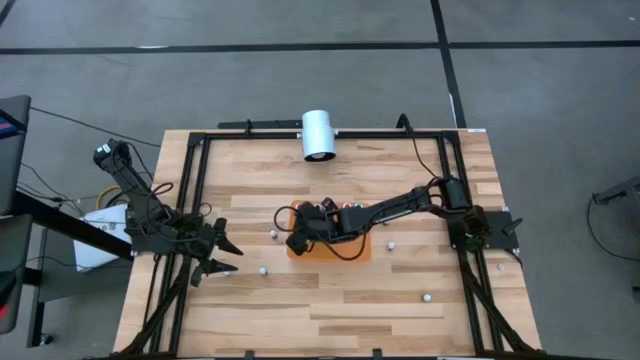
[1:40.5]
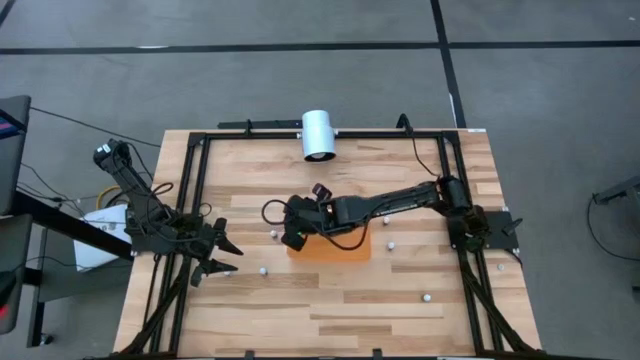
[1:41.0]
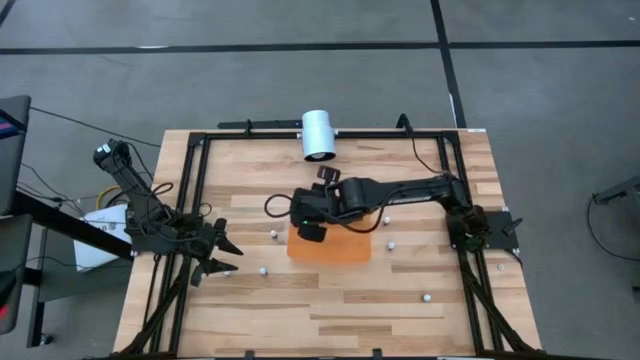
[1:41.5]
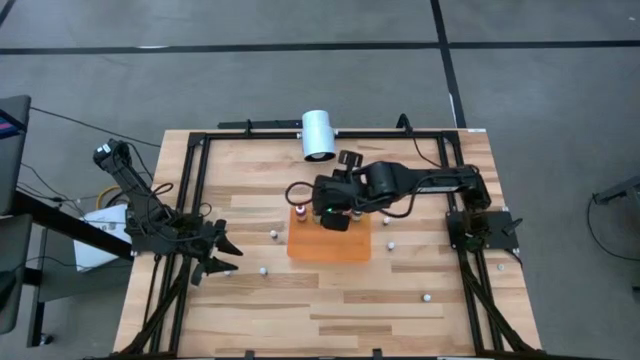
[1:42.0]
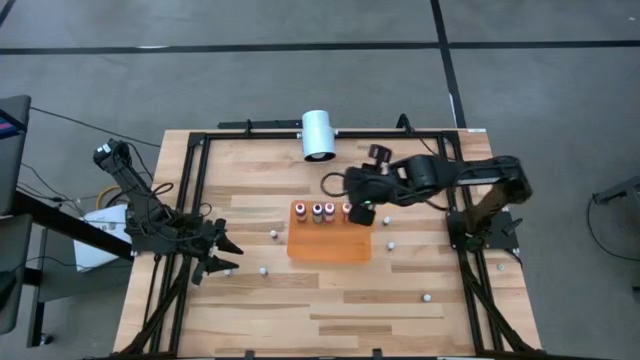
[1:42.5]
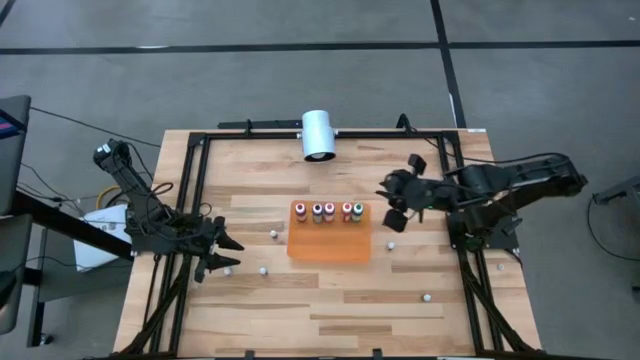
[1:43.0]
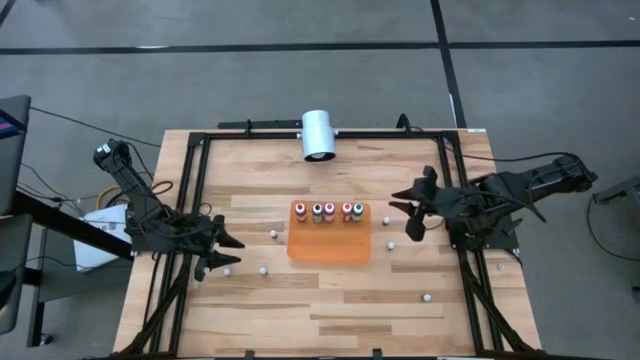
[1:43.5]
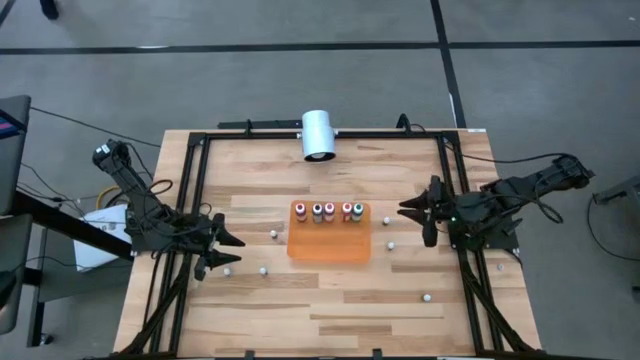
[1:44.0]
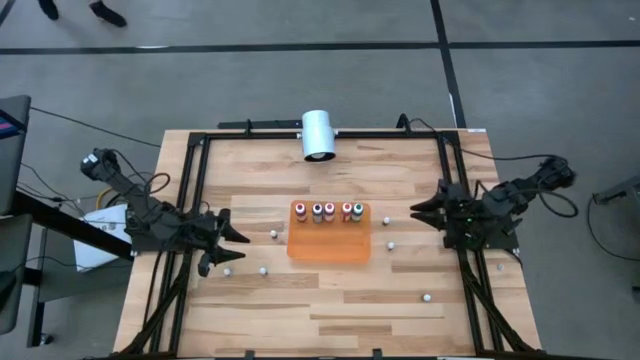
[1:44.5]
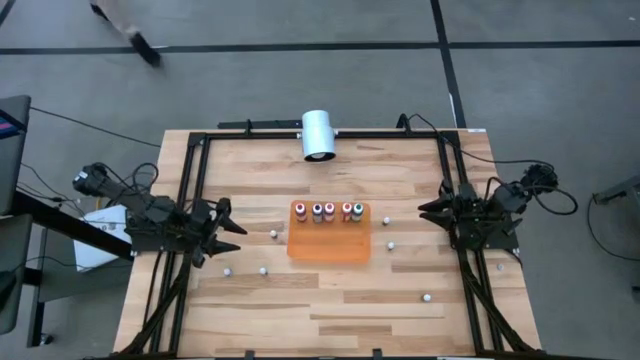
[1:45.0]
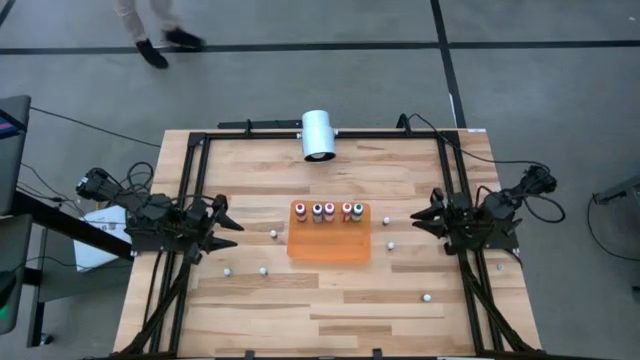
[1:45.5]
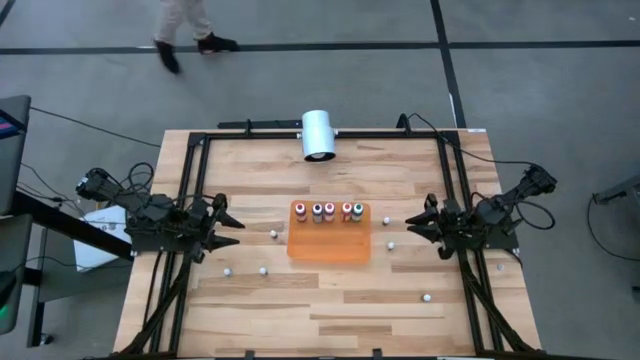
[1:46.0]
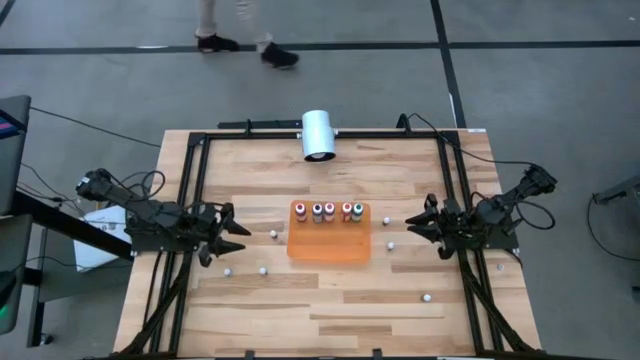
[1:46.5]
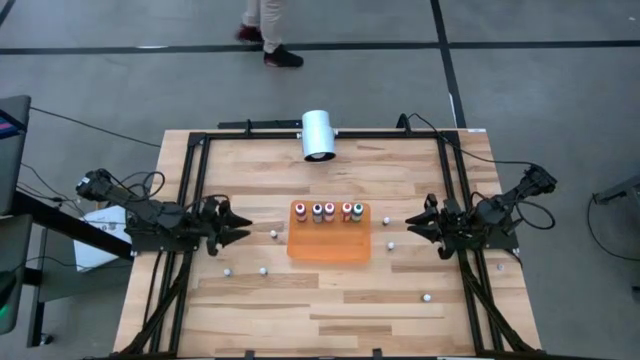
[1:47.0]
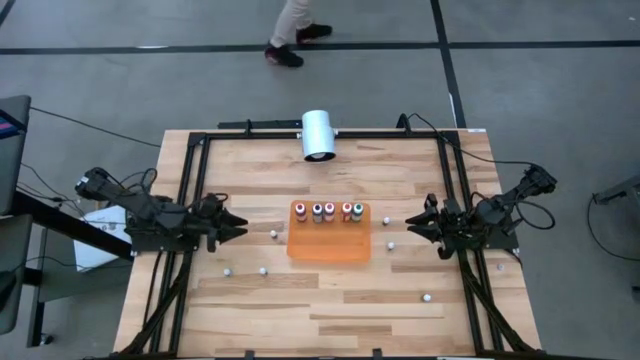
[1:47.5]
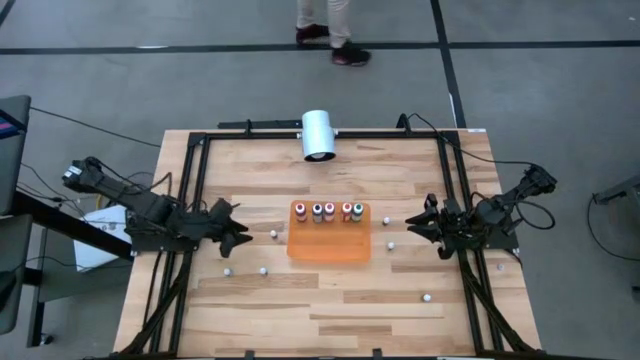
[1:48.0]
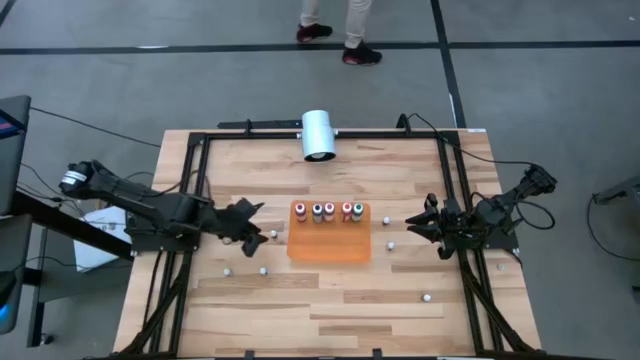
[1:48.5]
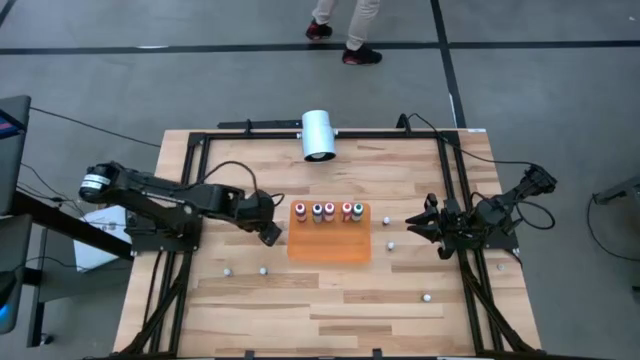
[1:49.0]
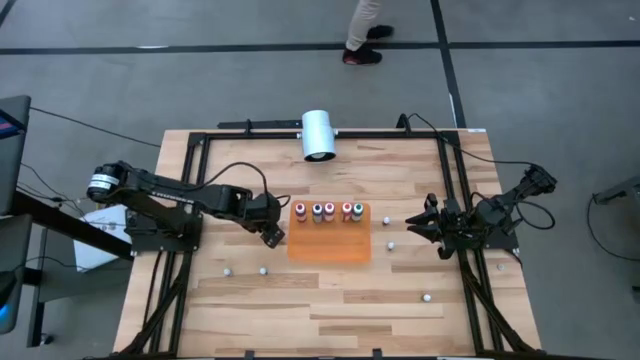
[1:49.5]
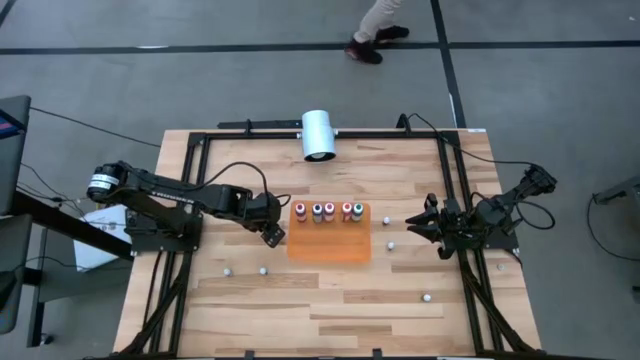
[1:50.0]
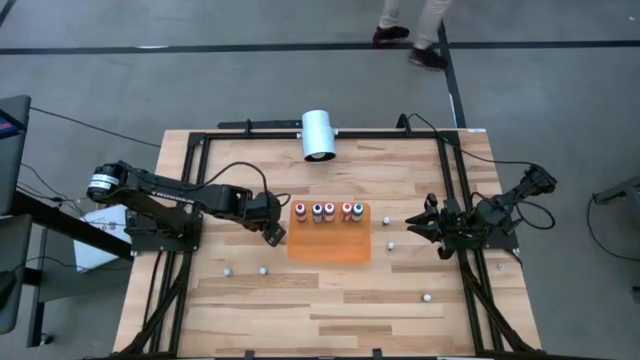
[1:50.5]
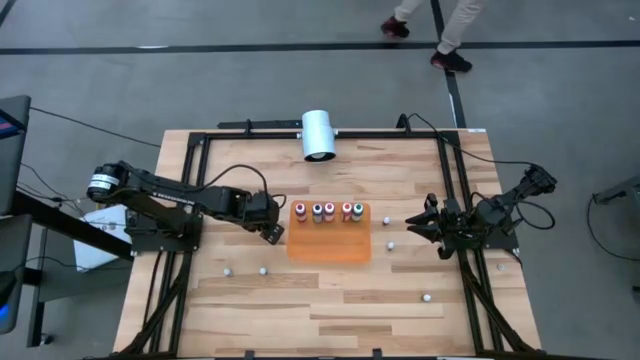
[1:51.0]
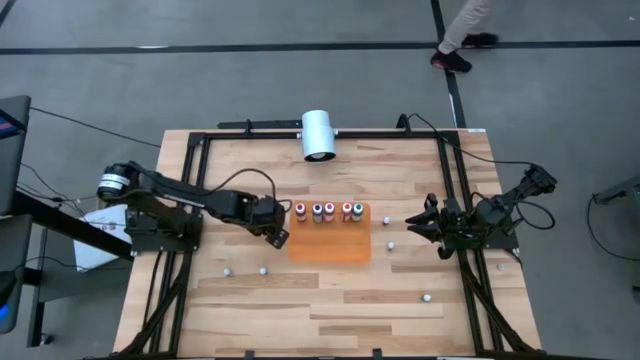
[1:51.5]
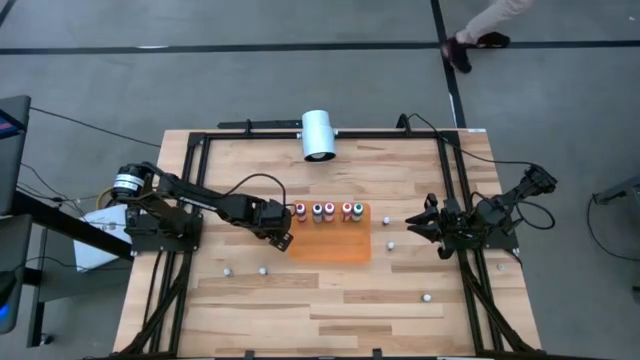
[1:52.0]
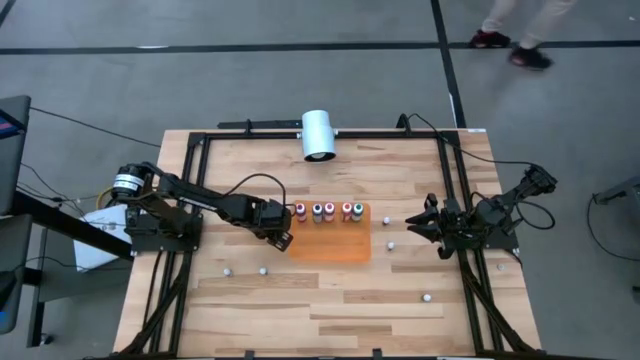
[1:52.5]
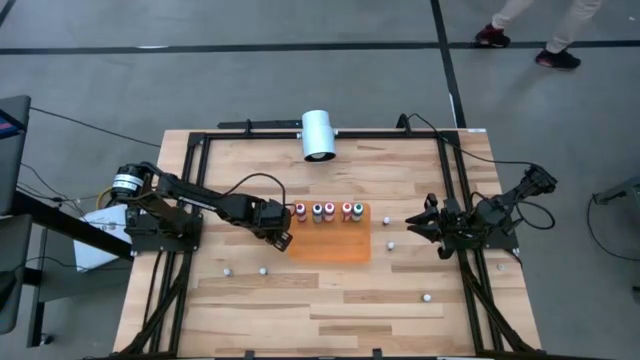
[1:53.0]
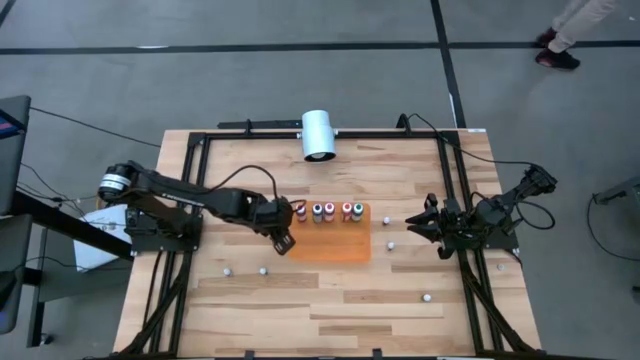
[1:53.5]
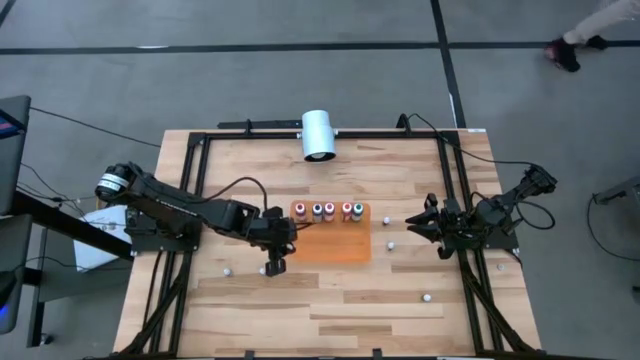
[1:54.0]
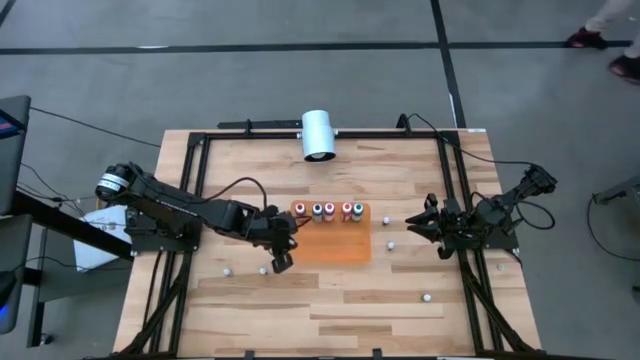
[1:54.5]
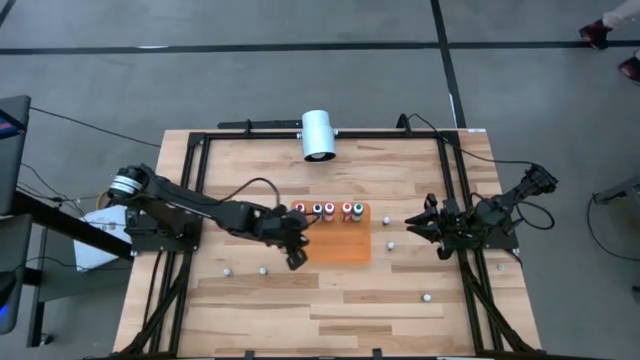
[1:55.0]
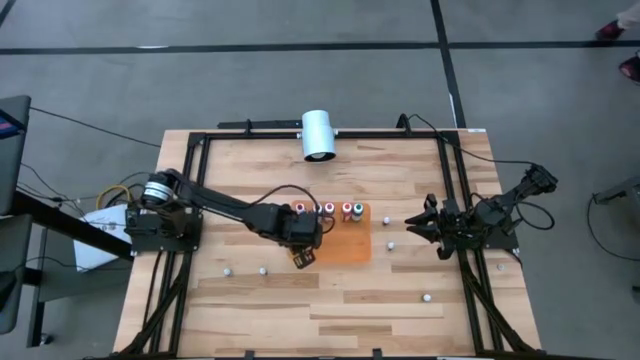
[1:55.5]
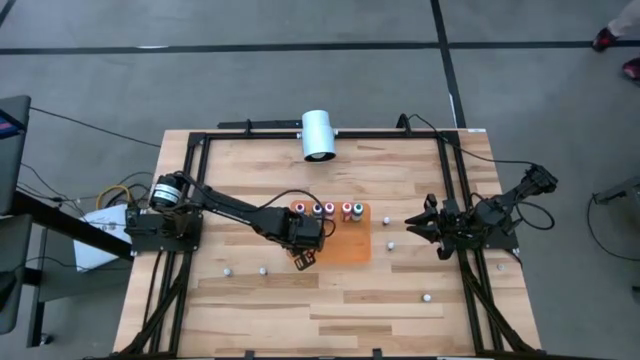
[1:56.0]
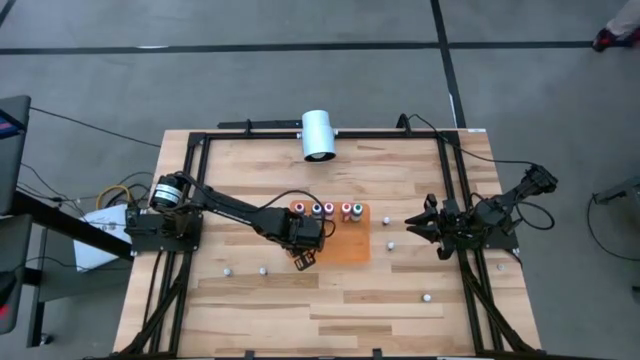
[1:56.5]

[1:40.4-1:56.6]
Task: Pick & Place food coloring
Put the small black food coloring into the orange bin

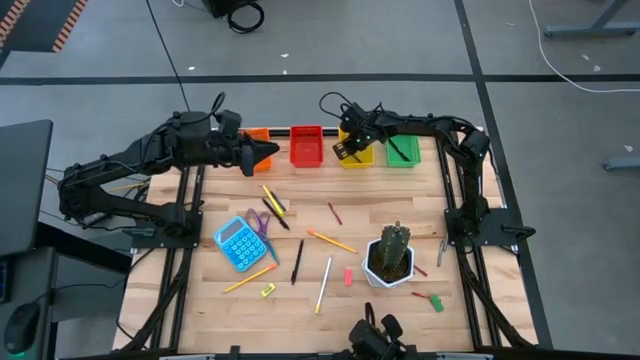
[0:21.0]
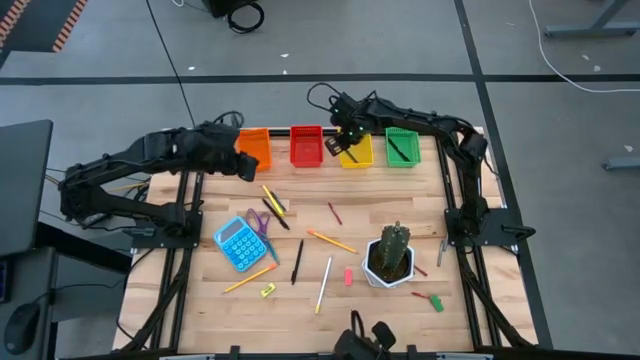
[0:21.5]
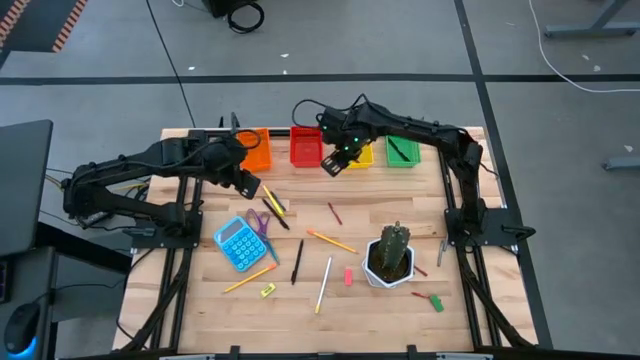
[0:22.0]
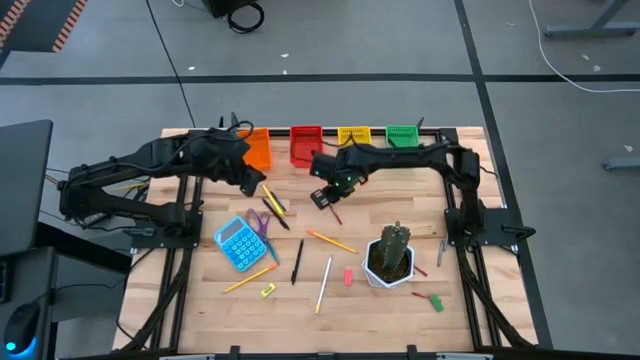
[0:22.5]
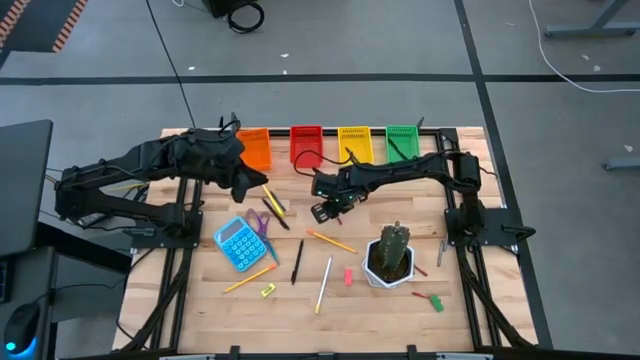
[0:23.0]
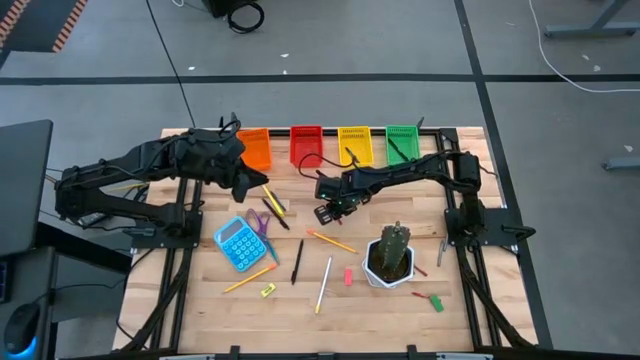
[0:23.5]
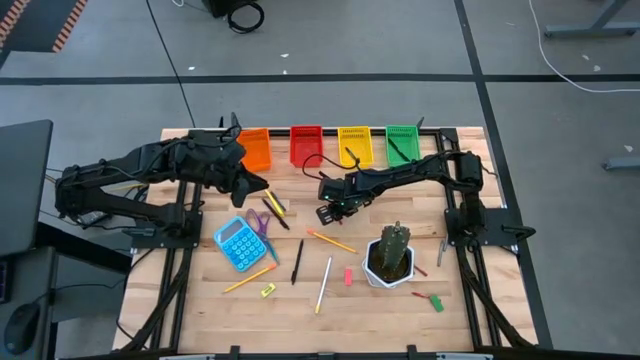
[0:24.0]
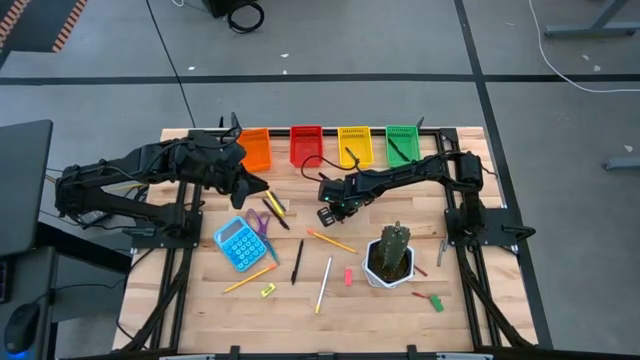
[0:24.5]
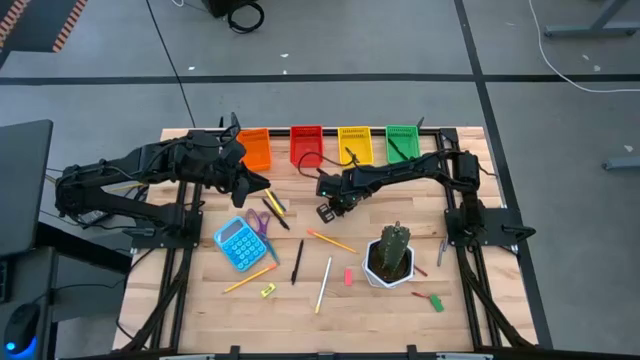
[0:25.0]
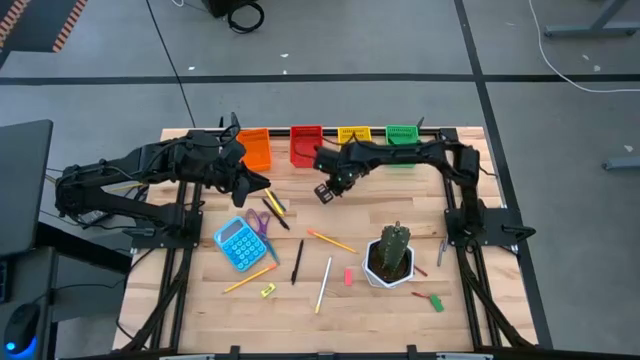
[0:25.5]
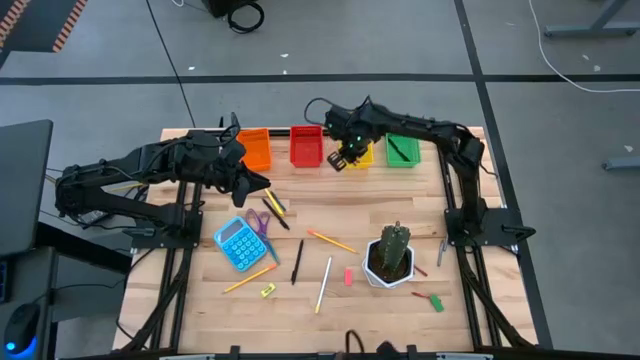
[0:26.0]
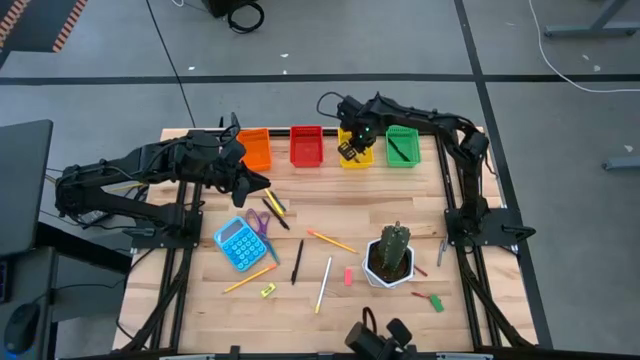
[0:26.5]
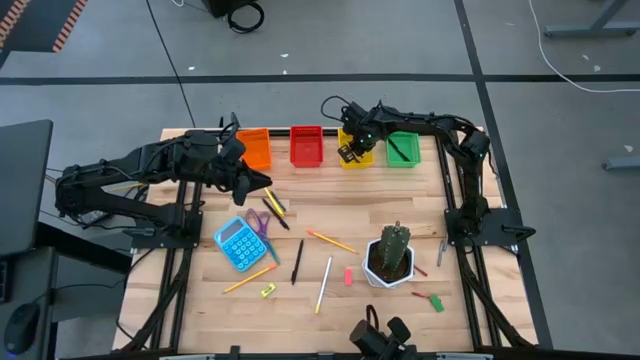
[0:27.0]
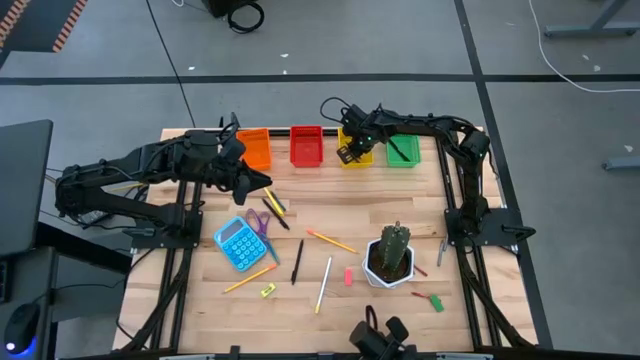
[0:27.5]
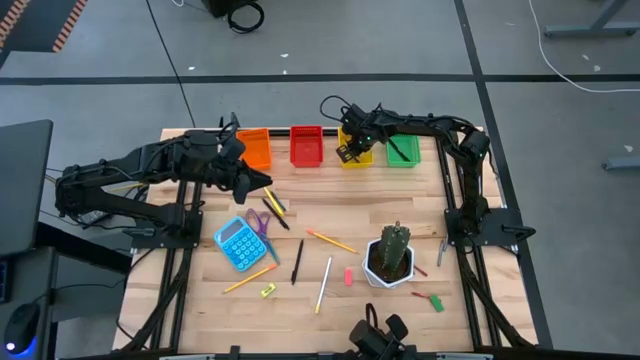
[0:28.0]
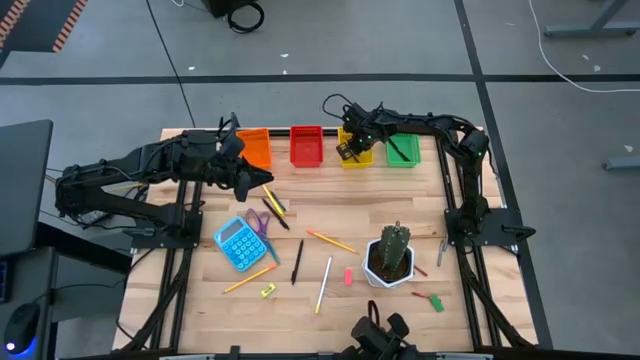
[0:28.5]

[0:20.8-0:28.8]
Task: Sort crayons/erasers/pens/pencils in bins
Put the top red crayon into the yellow bin
